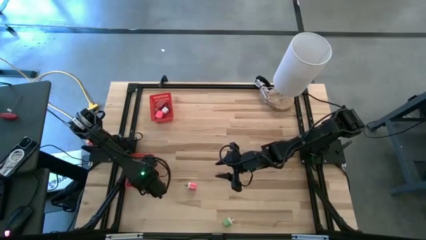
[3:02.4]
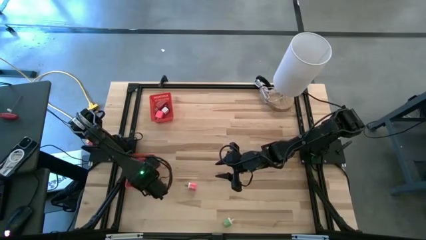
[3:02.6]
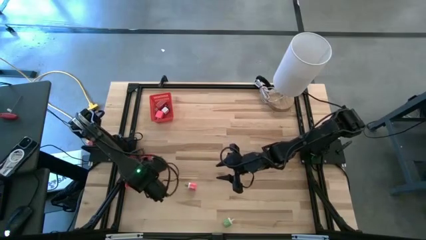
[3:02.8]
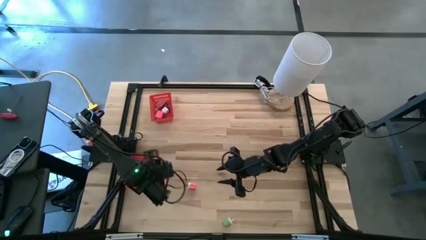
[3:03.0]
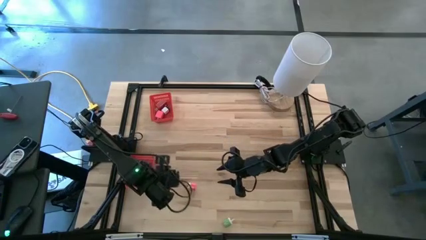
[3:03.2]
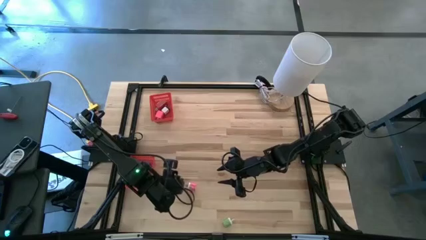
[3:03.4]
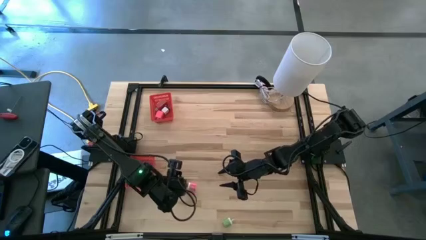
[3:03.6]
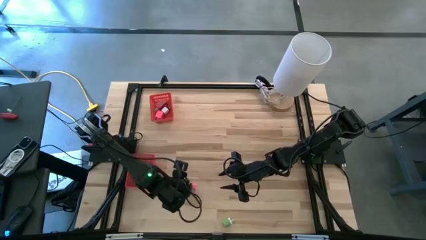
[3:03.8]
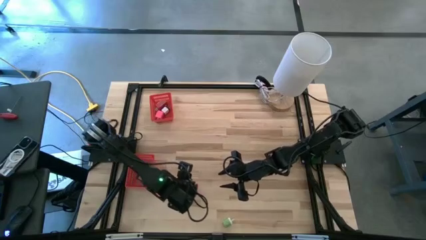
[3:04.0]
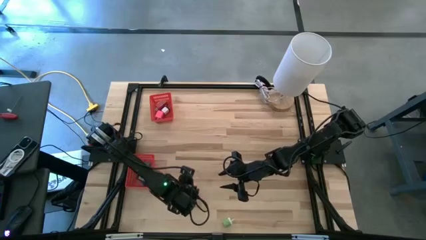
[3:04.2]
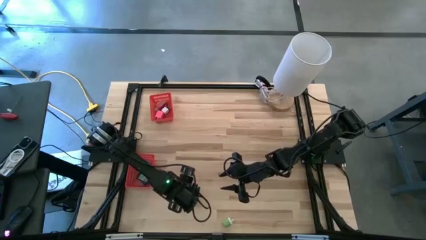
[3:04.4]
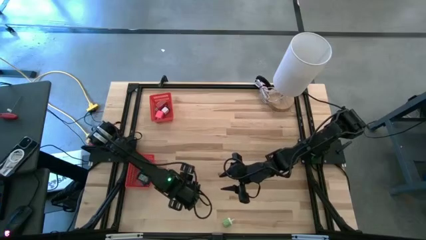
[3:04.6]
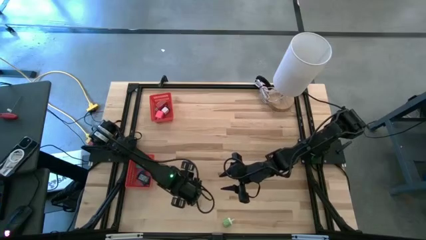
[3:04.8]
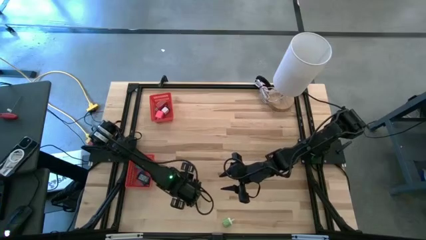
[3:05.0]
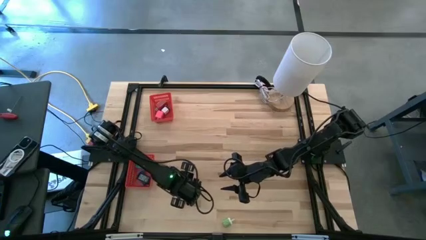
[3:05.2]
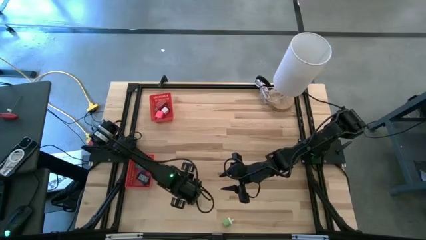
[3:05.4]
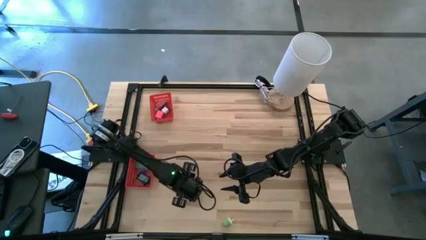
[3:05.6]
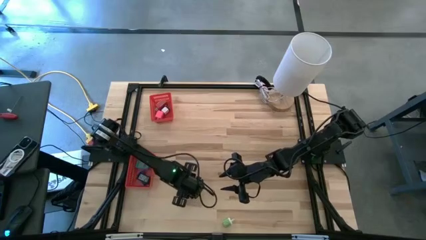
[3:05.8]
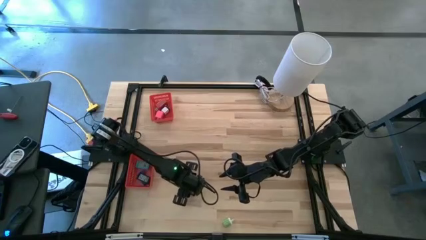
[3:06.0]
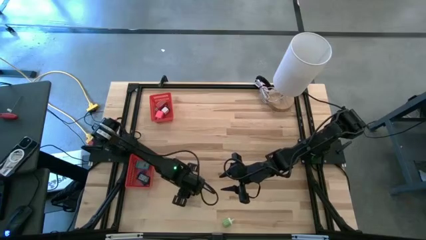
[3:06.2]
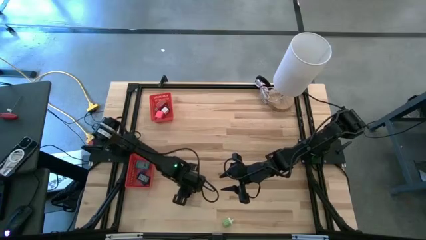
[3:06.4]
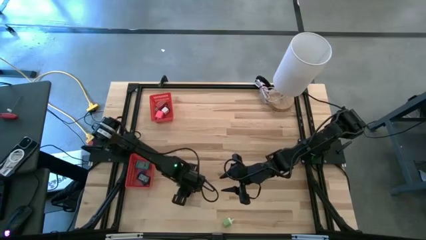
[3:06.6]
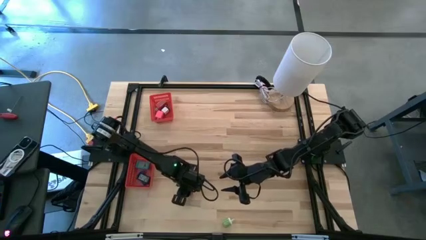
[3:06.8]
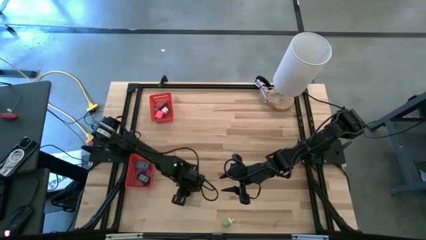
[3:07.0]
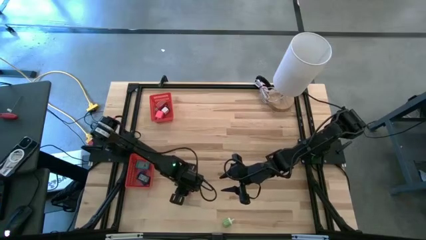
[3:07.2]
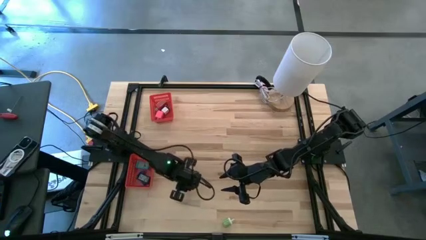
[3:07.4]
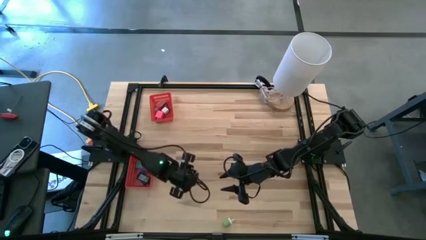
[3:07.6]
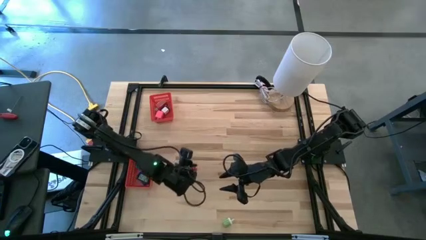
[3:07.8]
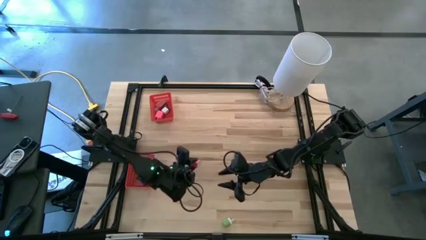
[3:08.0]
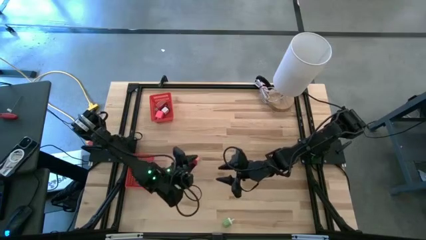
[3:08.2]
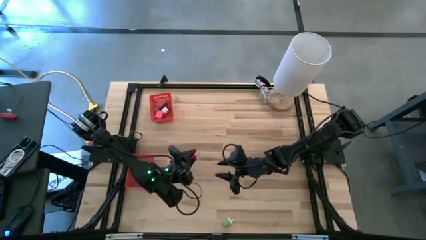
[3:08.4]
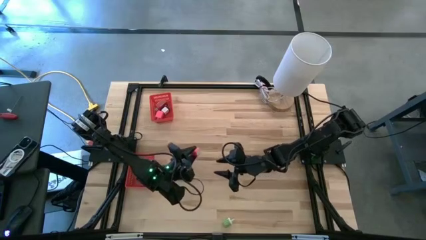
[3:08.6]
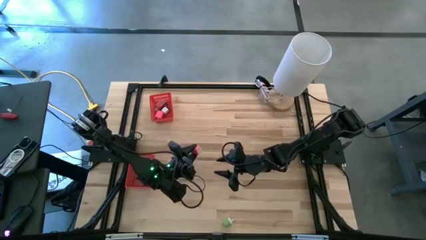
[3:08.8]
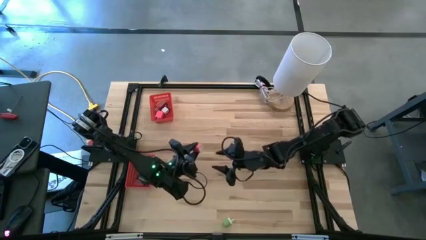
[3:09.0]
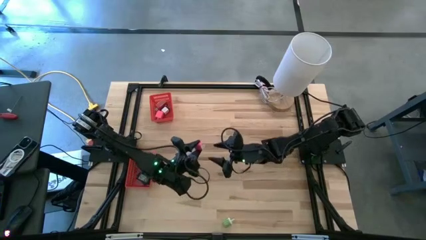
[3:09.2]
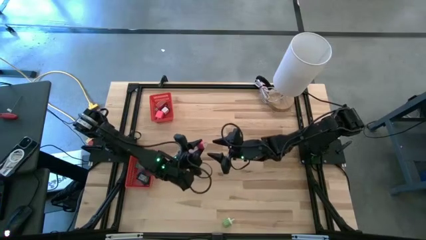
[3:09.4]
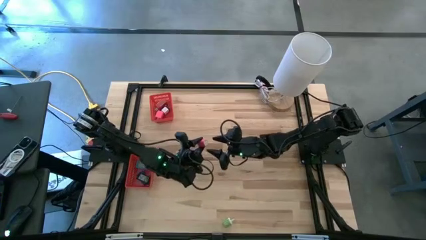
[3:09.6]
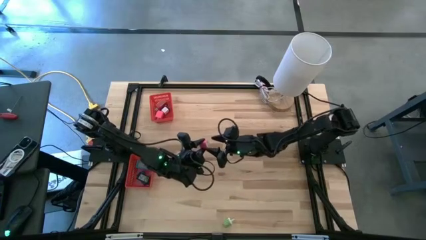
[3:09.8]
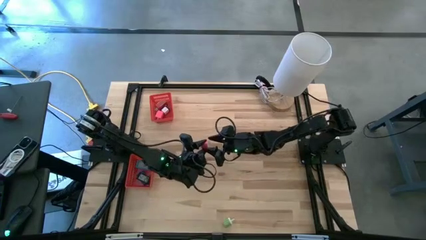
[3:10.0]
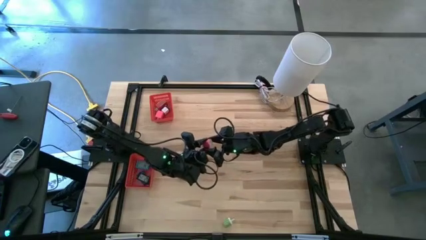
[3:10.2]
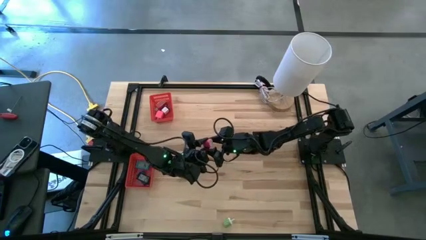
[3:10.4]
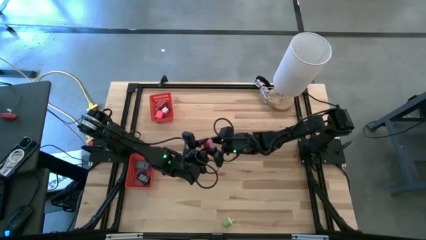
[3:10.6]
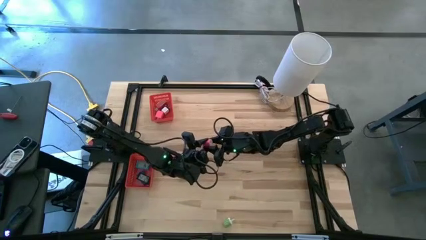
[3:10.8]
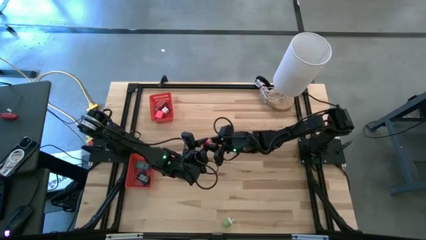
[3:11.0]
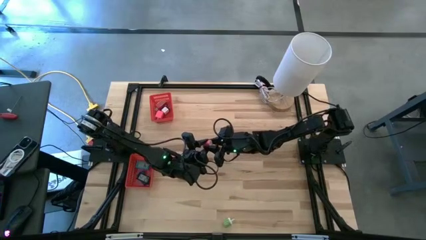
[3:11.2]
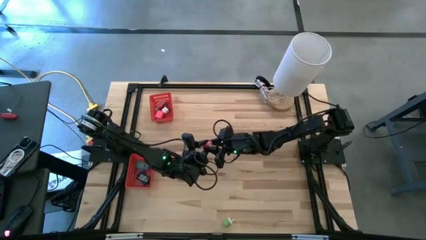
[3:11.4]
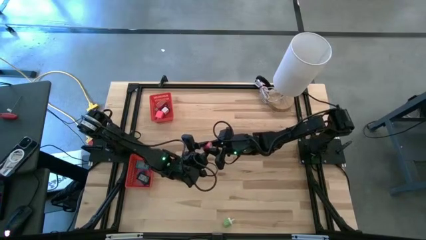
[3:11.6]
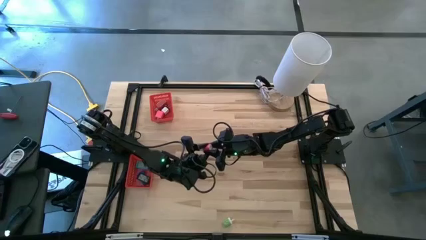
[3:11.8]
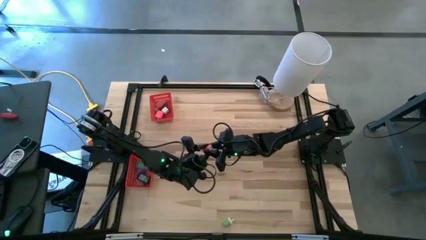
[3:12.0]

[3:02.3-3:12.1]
Task: Pick & Place Office items
Put the pink charger adapter into the bottom red bin

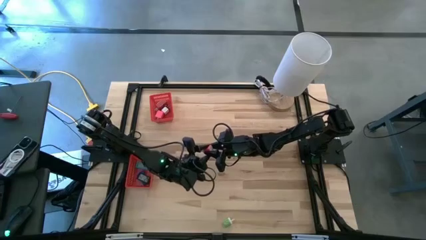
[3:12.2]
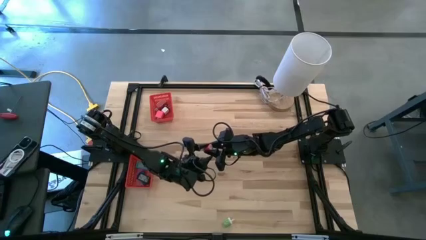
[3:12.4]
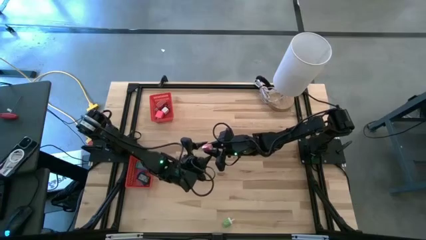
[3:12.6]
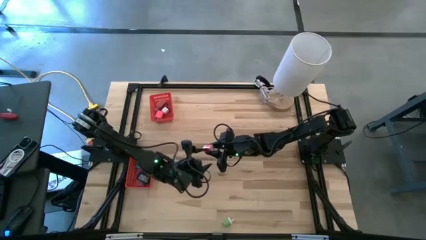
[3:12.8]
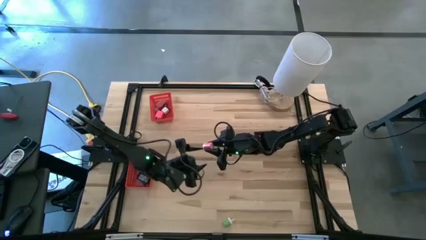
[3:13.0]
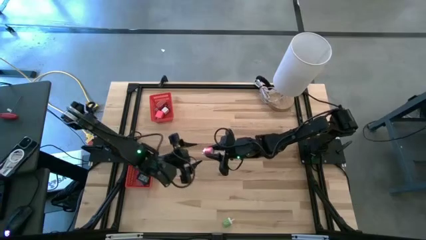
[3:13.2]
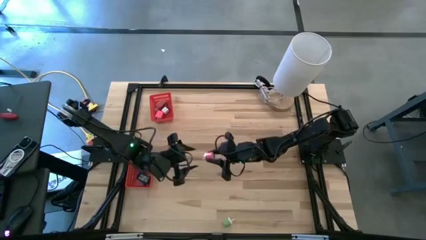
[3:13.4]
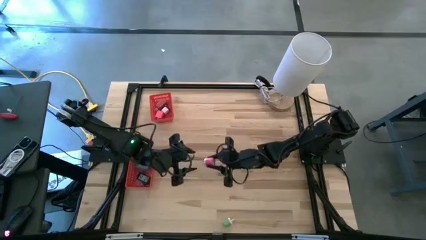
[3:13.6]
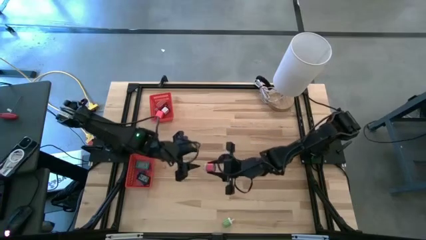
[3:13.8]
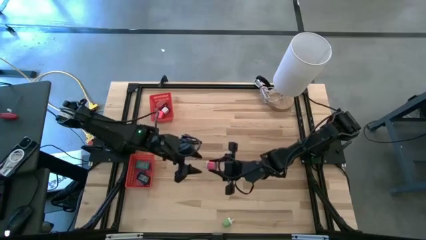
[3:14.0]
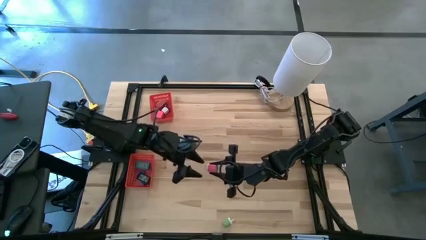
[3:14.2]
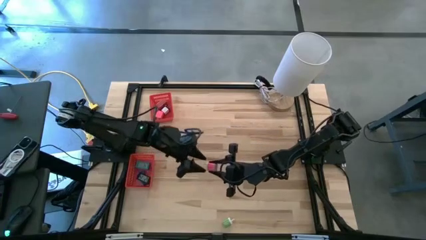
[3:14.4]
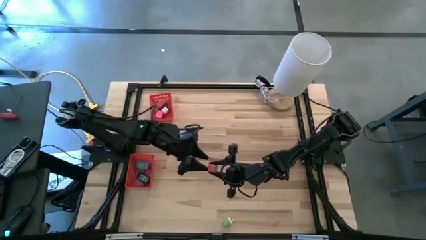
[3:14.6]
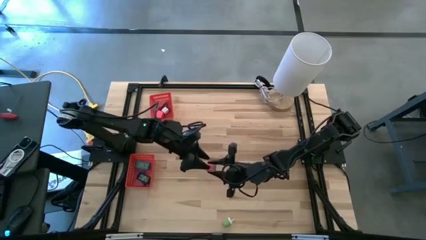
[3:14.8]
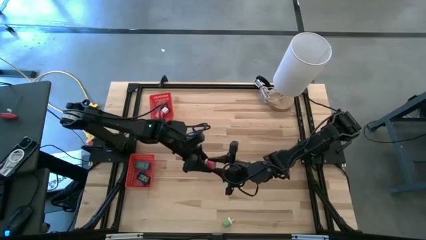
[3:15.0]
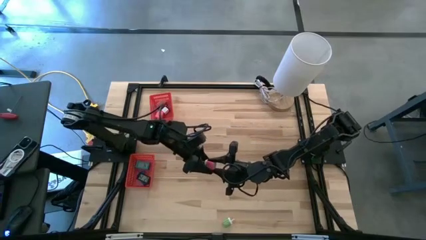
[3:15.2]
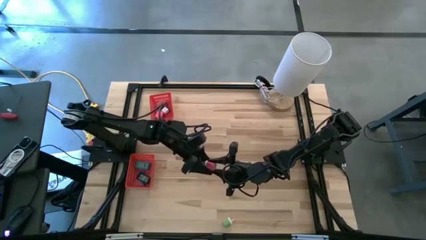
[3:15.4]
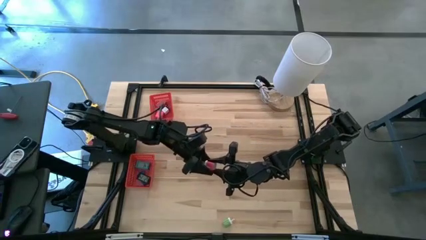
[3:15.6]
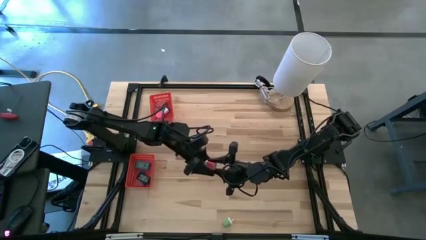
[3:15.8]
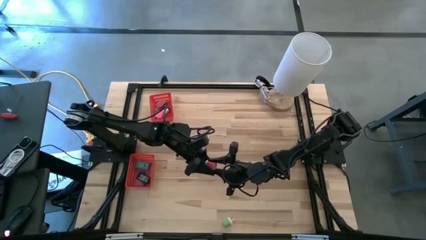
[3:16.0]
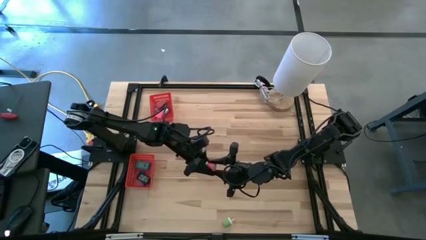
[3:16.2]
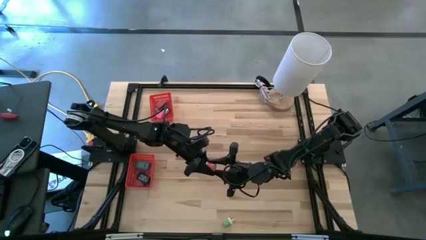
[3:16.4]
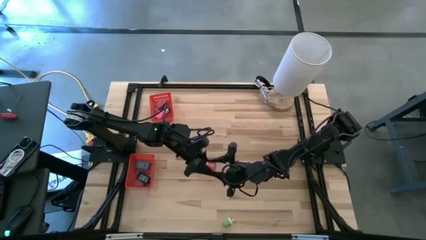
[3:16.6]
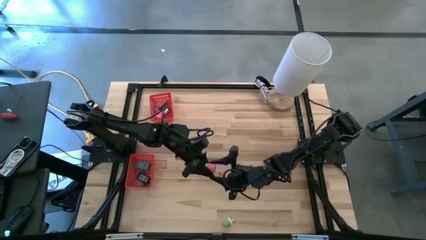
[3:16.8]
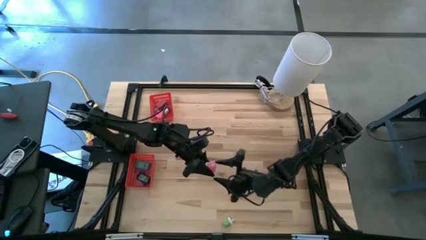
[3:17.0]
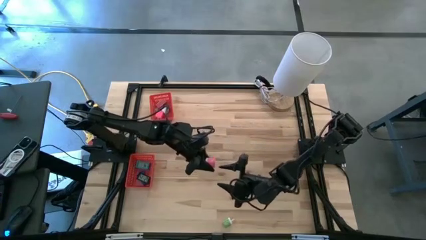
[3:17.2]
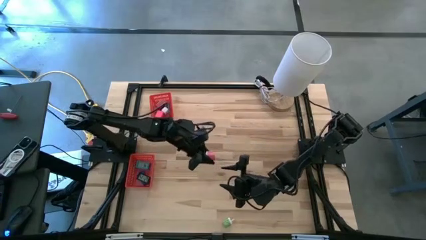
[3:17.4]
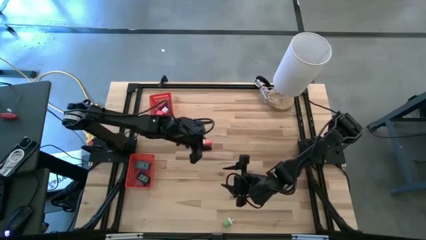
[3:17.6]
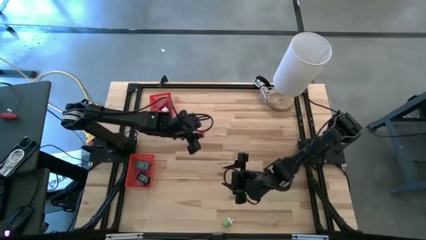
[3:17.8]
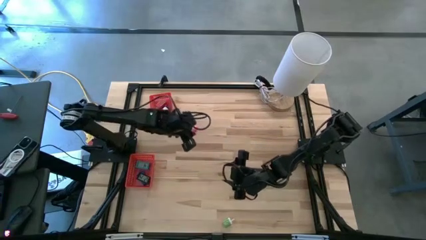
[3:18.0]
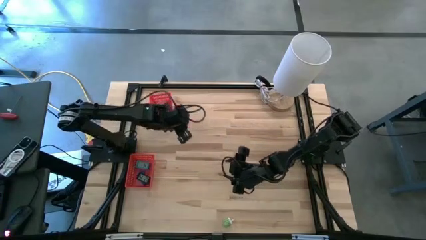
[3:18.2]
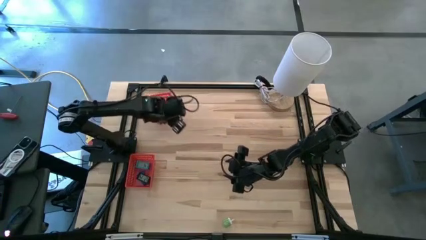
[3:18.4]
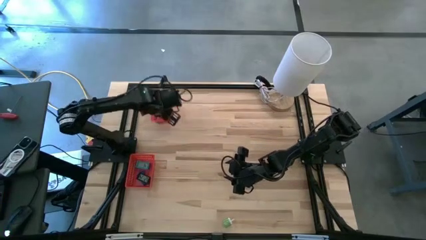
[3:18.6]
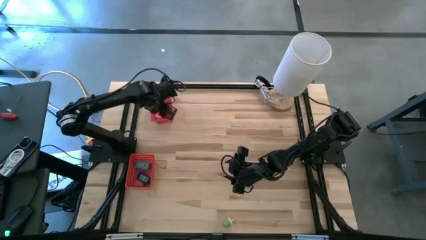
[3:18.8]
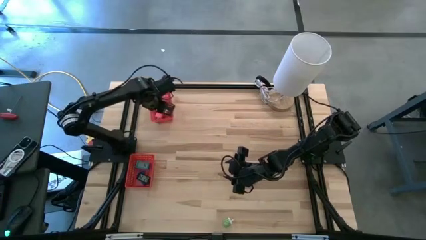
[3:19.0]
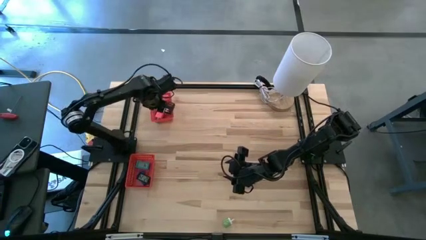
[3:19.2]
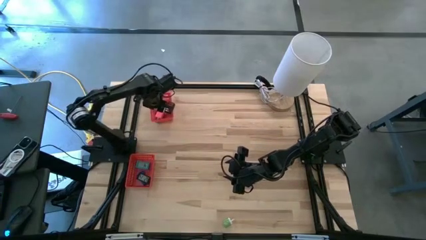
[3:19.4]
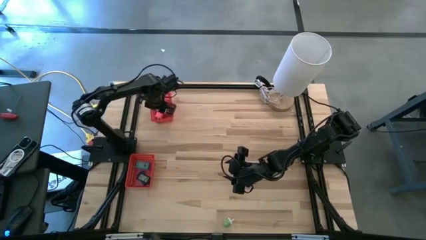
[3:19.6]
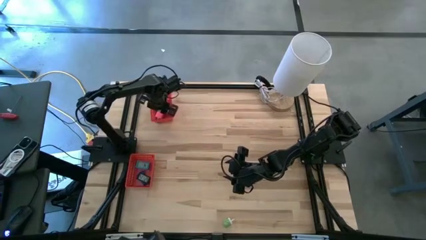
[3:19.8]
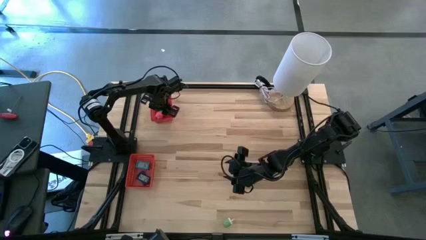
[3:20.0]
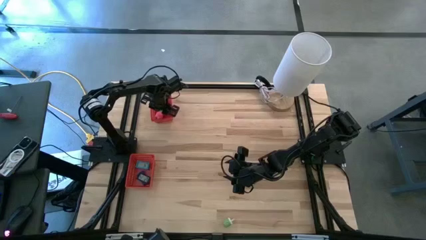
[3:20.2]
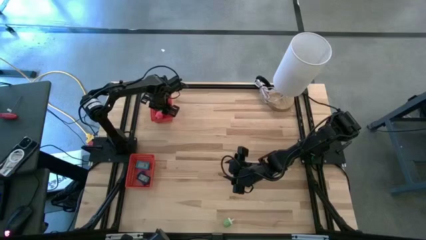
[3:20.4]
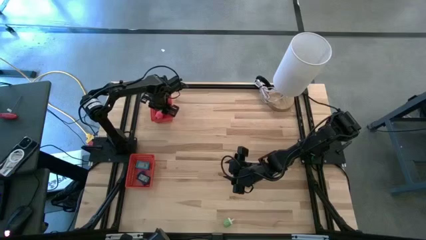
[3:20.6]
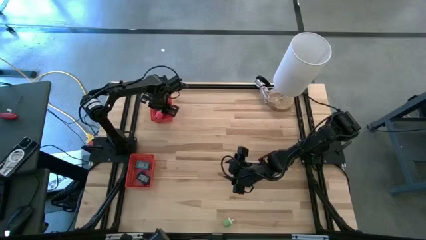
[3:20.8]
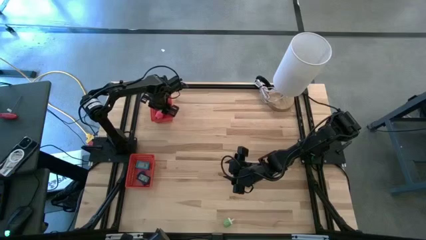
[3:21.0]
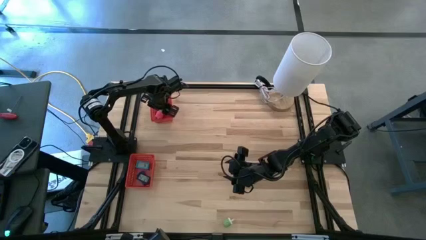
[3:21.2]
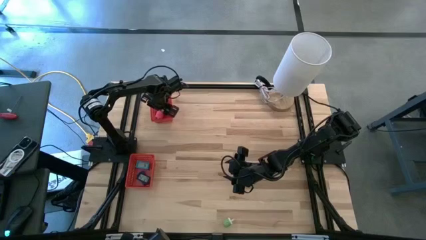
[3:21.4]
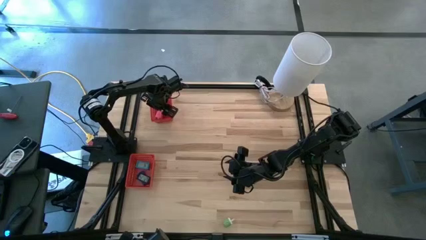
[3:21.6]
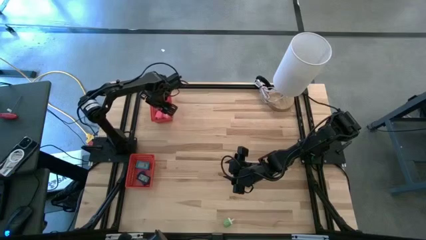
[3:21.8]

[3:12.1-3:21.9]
Put the pink charger adapter into the bottom red bin
